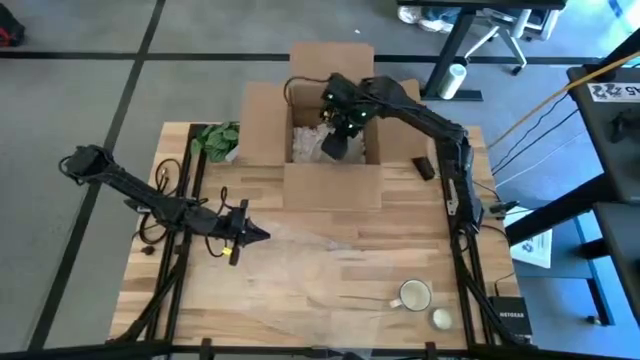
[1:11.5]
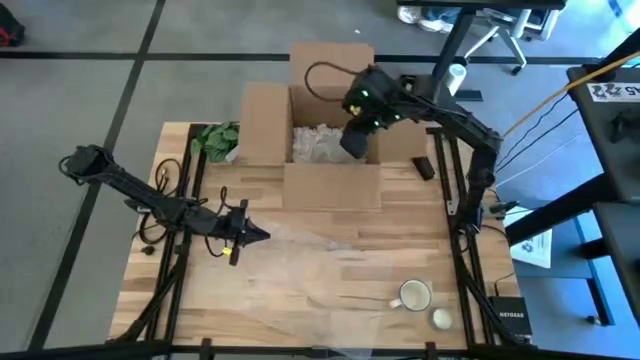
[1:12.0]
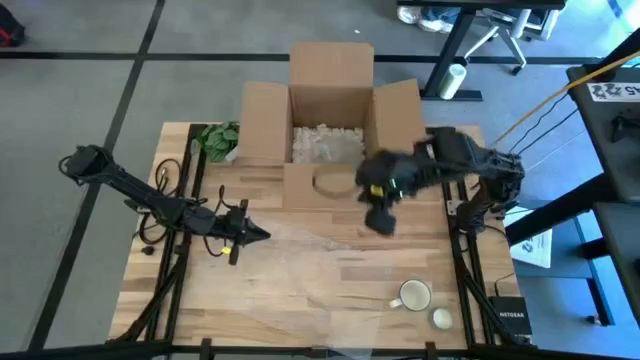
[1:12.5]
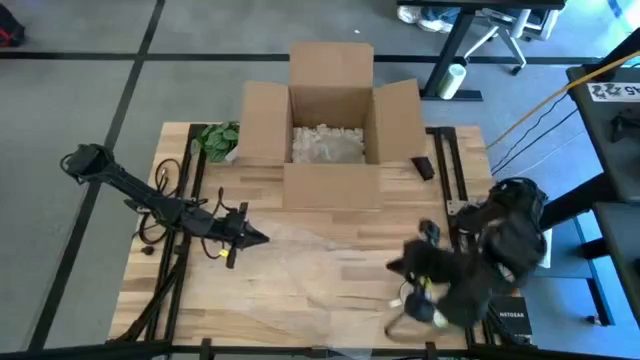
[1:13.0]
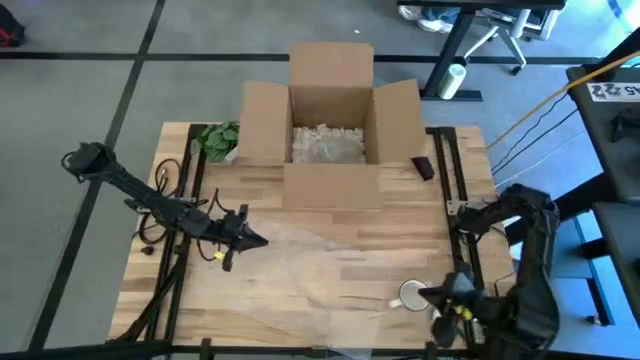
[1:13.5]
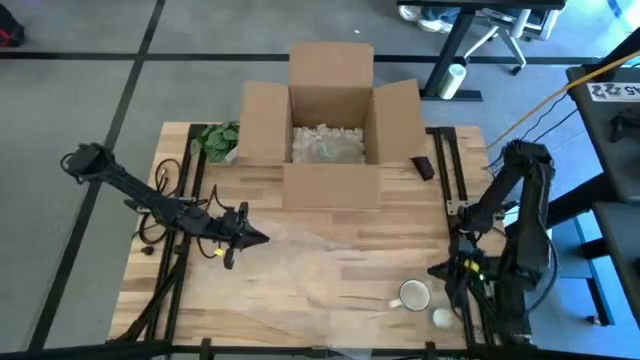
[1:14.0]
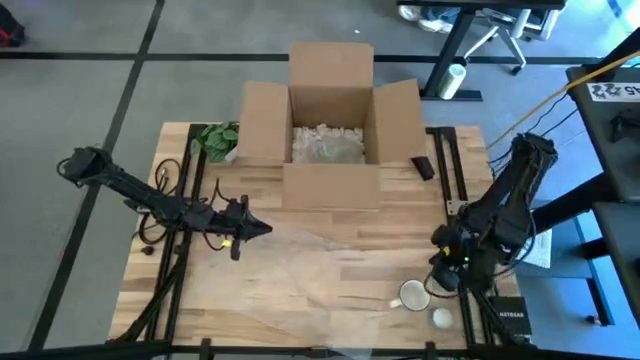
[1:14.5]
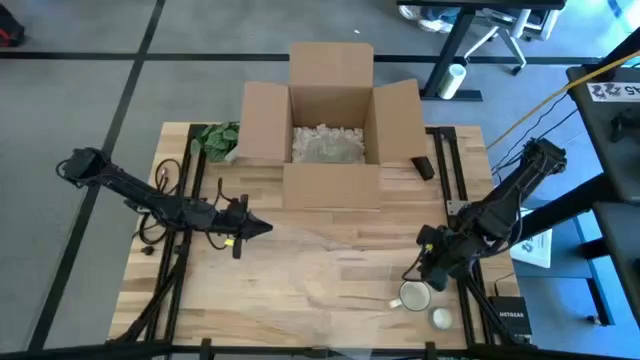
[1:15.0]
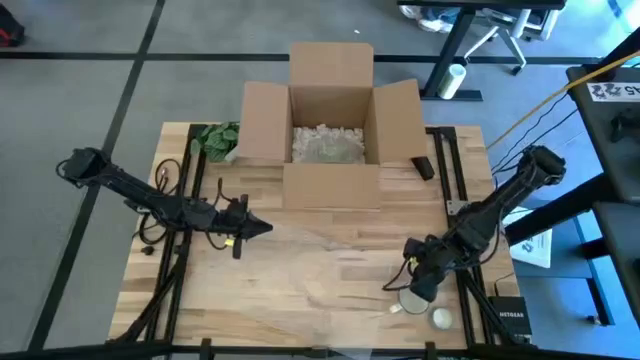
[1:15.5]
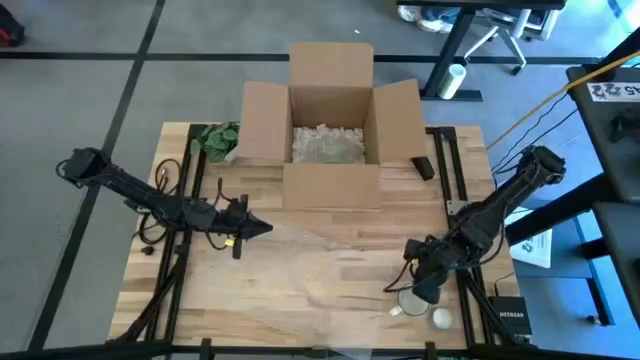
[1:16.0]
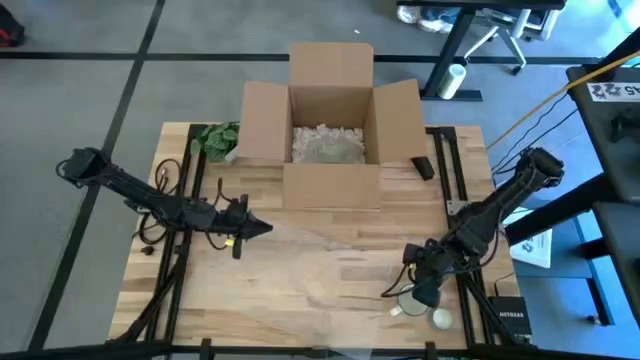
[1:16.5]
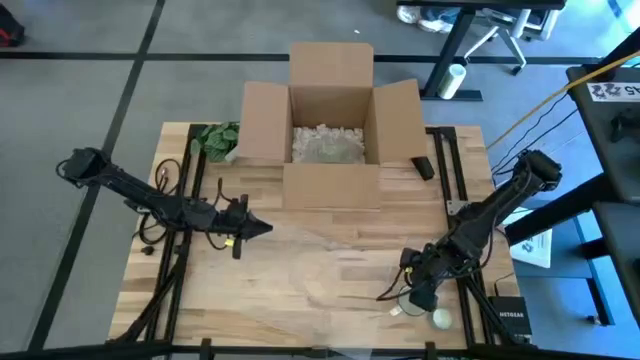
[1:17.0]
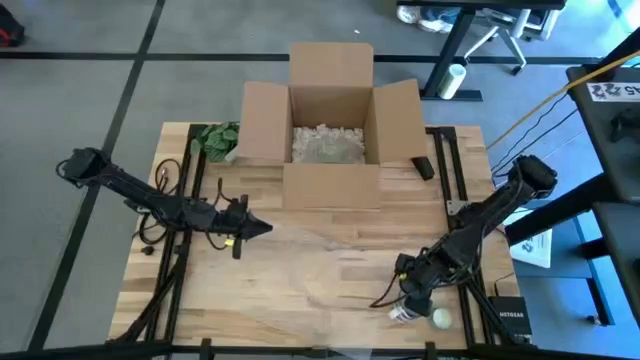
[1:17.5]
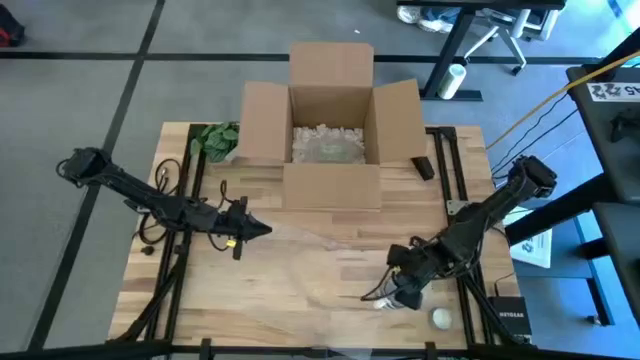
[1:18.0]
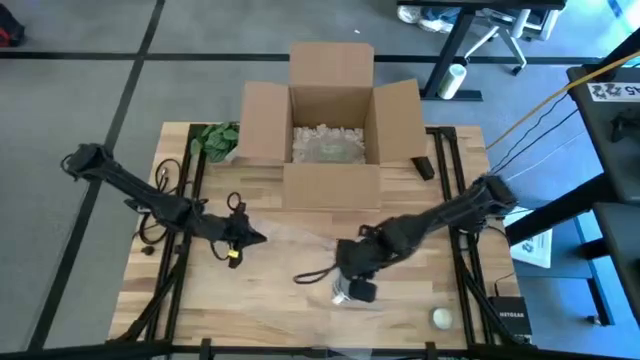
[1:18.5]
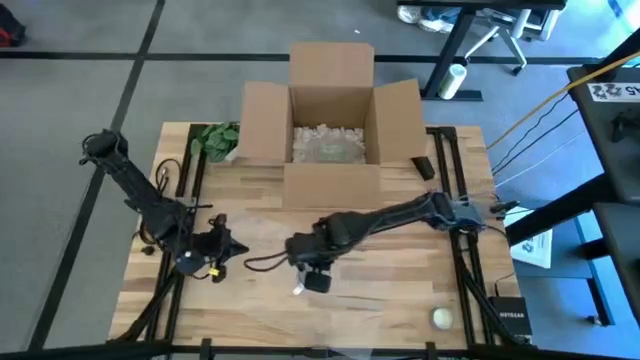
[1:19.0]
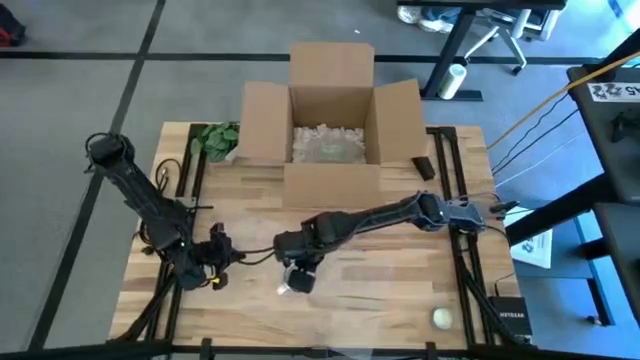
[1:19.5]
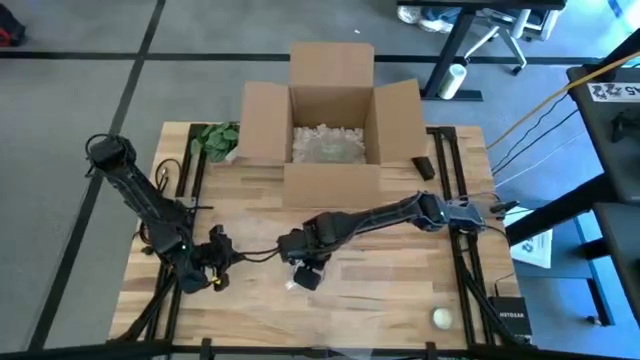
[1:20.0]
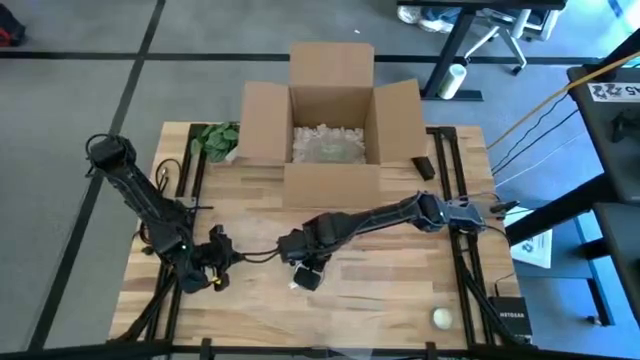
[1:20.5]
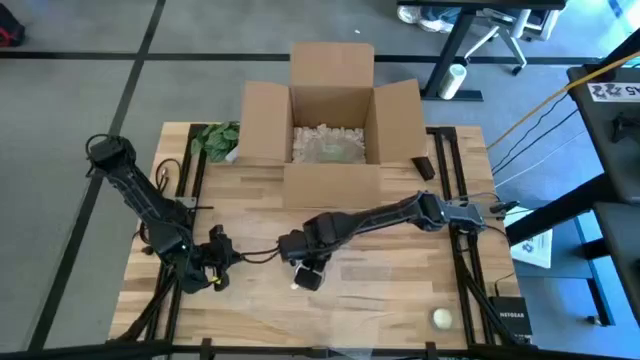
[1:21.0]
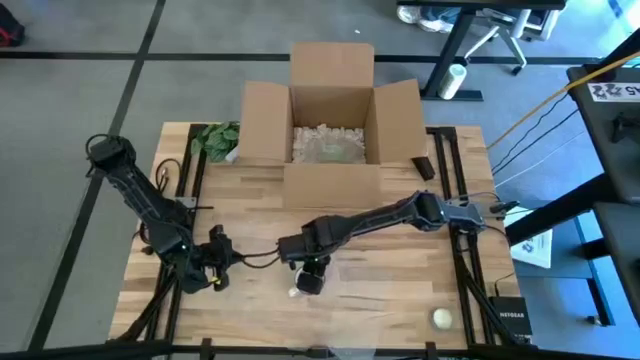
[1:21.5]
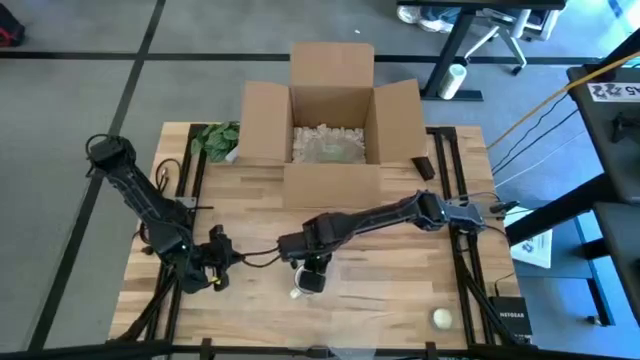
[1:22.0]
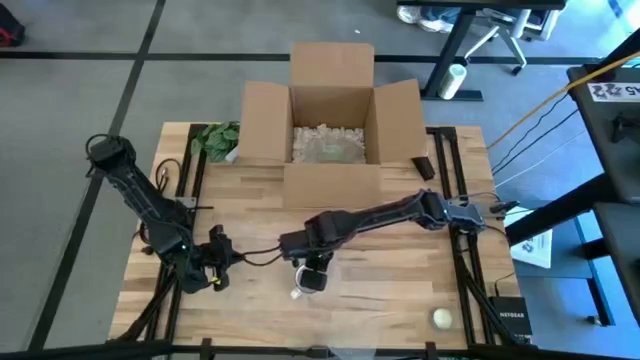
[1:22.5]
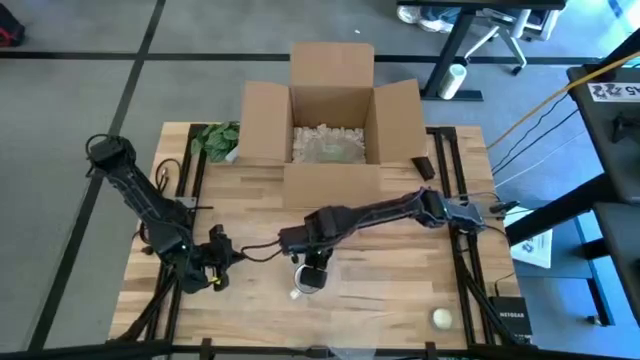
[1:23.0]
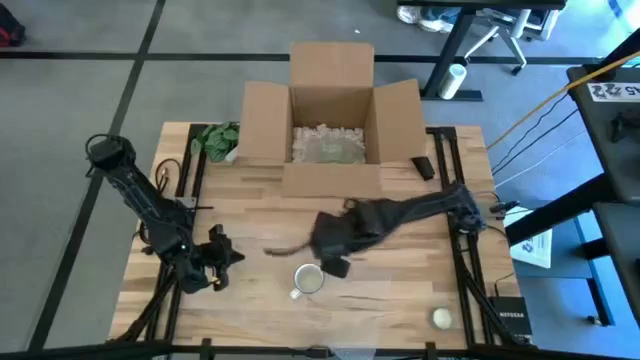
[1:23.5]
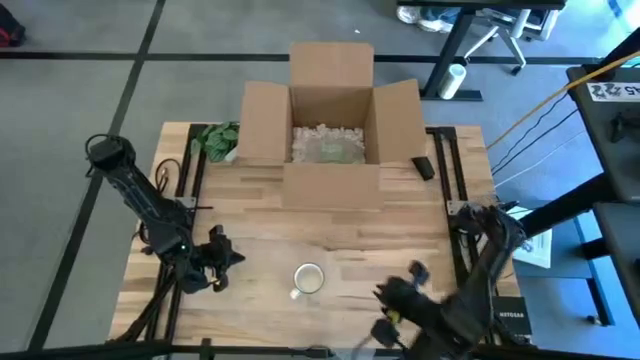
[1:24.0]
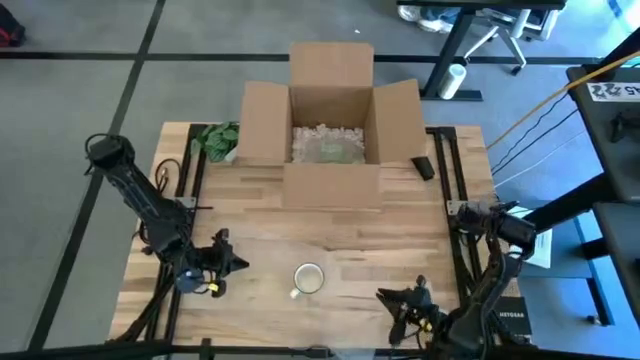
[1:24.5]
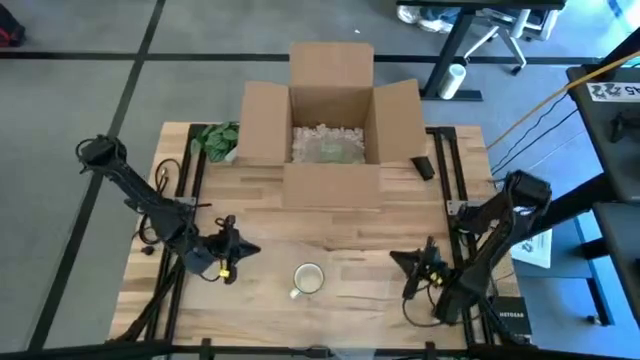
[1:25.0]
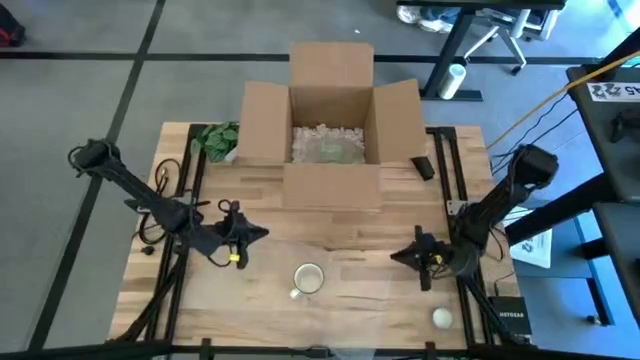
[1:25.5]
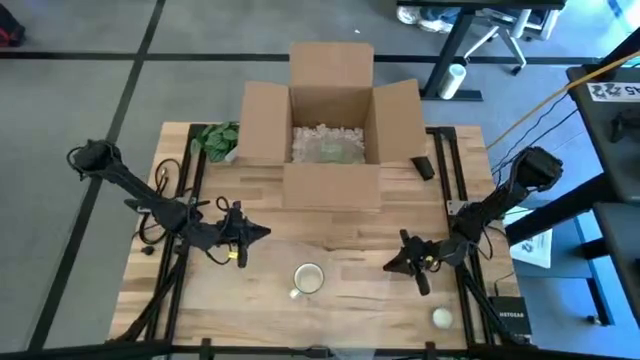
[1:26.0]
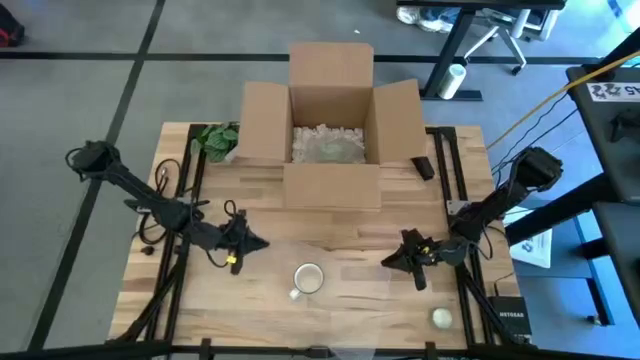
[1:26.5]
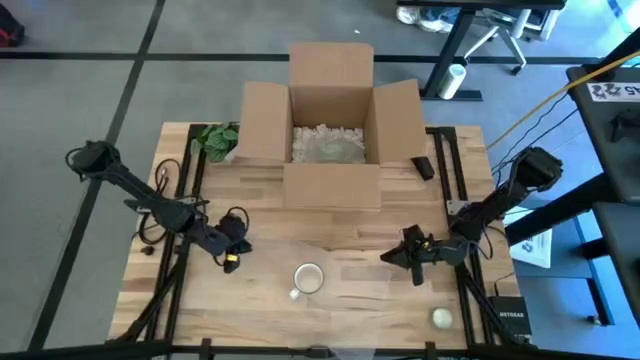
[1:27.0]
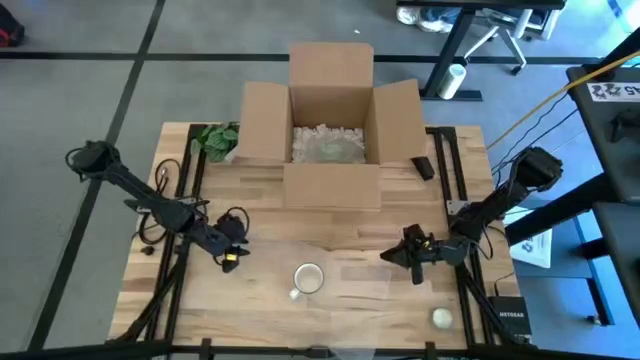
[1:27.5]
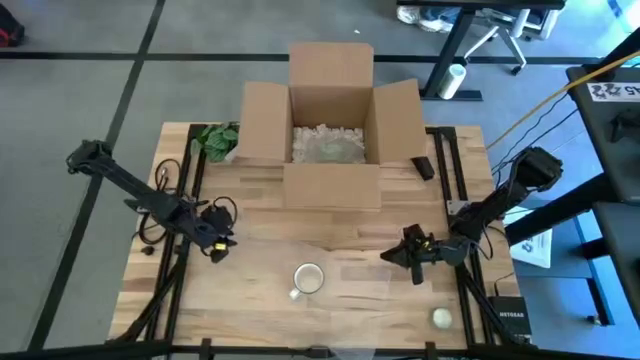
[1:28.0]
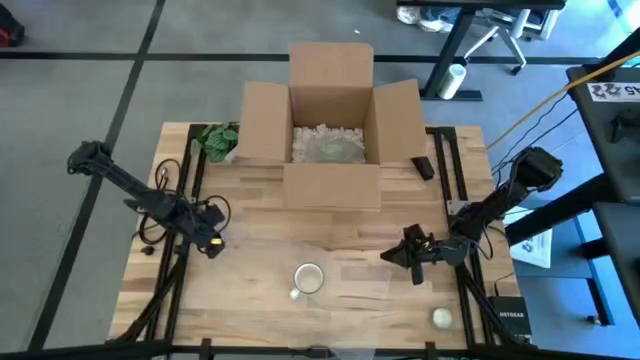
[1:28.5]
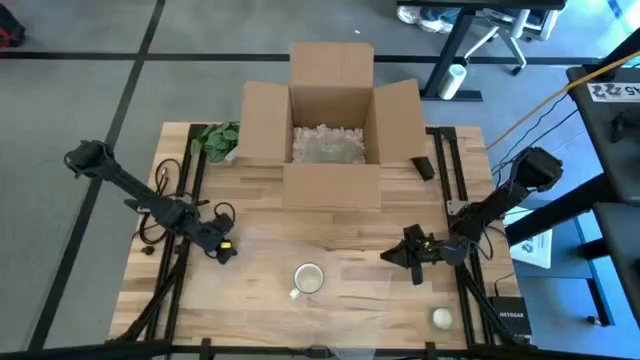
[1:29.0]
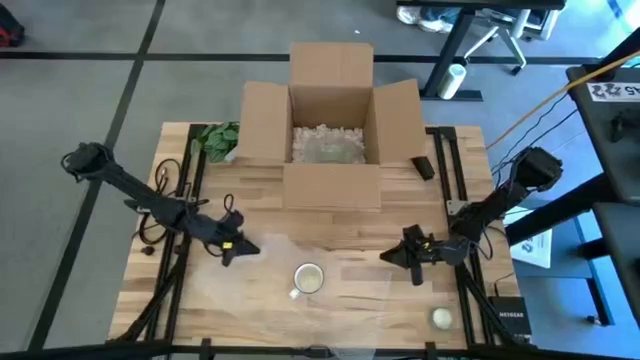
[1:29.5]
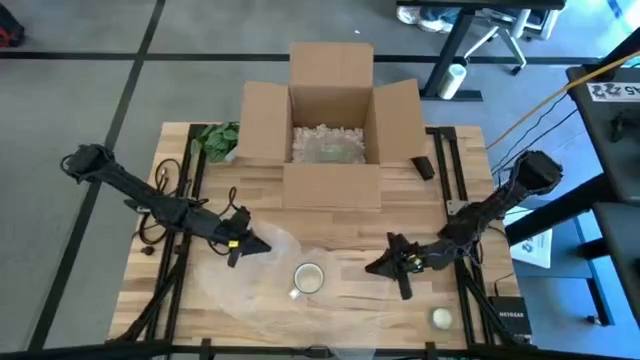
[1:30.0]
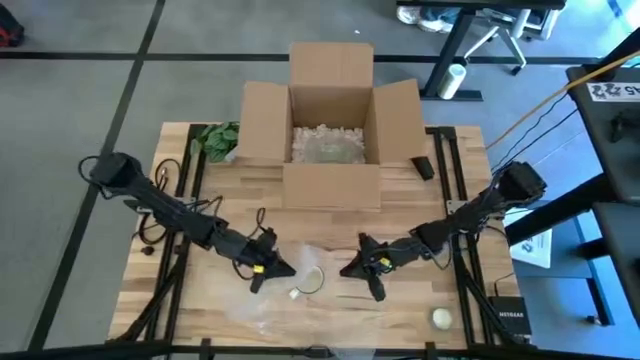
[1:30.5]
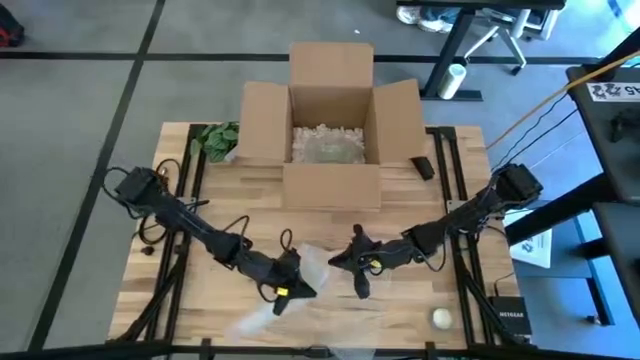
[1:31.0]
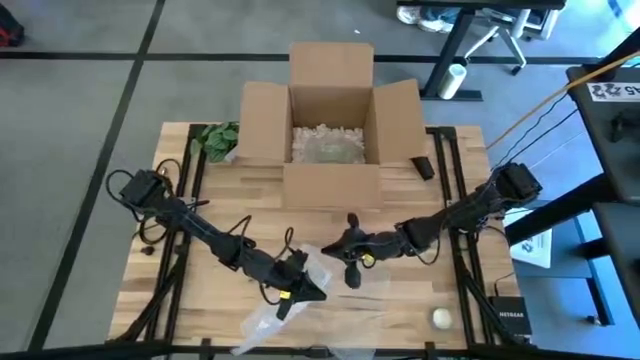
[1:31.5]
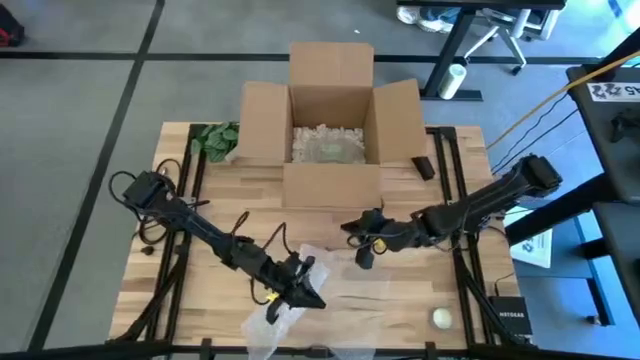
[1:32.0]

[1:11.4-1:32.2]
Task: wrap mug
Wrap the white and blue mug with the bubble wrap

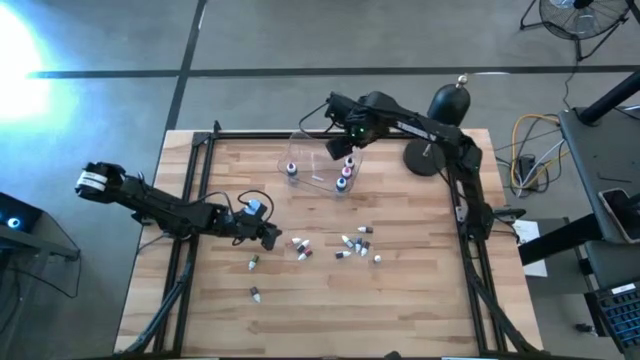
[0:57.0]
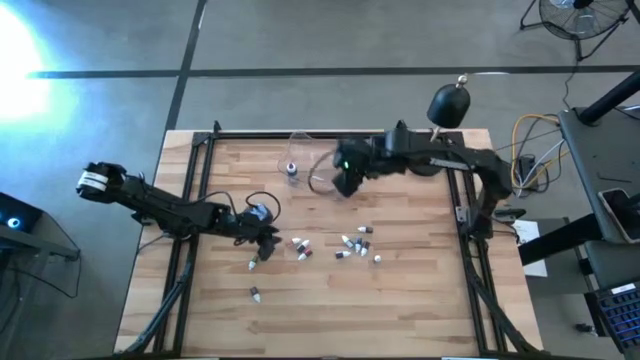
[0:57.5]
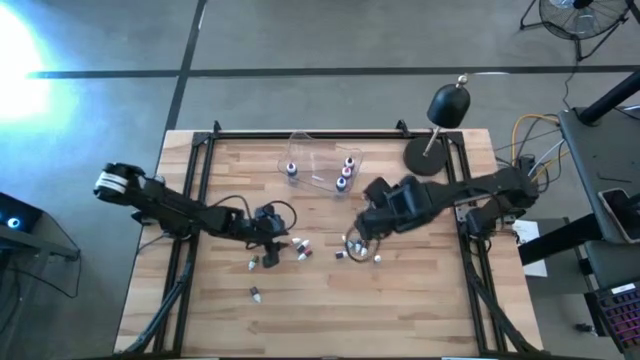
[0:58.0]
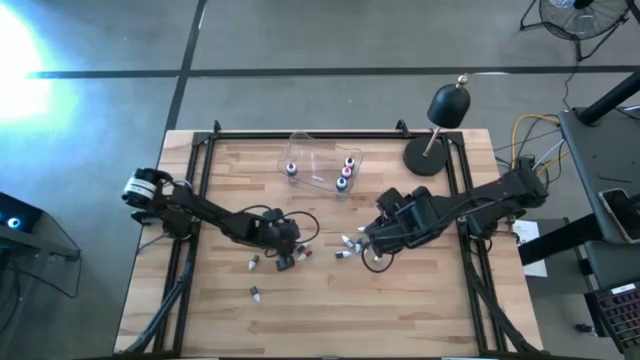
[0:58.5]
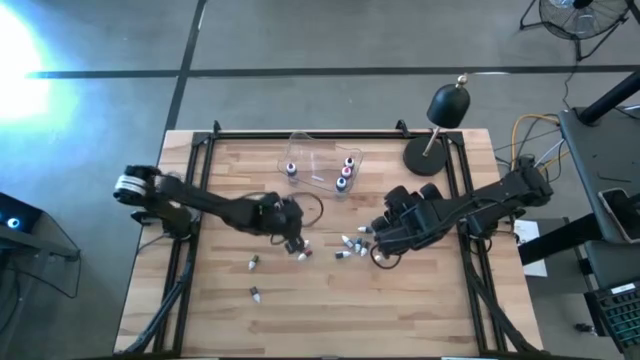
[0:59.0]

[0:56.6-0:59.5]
Task: Pick & Place food coloring
Put the small orange food coloring bottle on the right into the transparent bin
